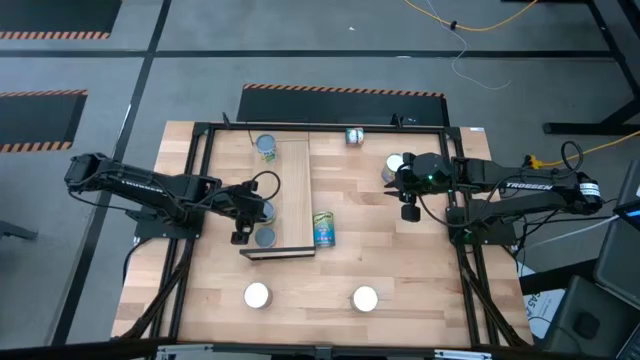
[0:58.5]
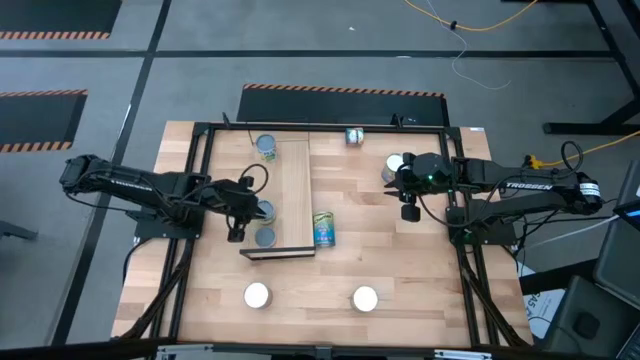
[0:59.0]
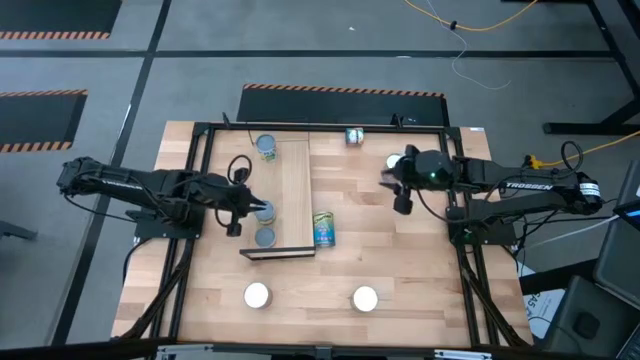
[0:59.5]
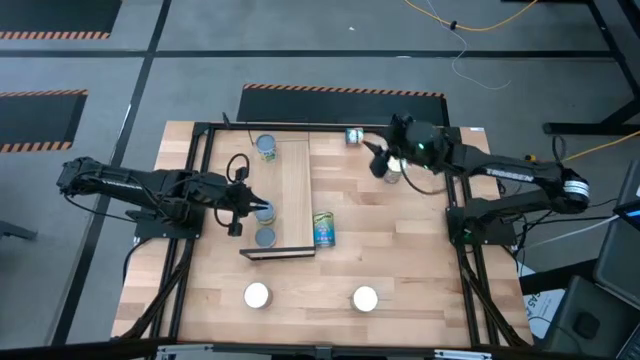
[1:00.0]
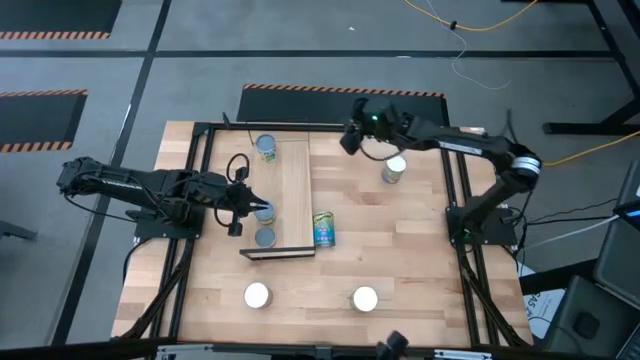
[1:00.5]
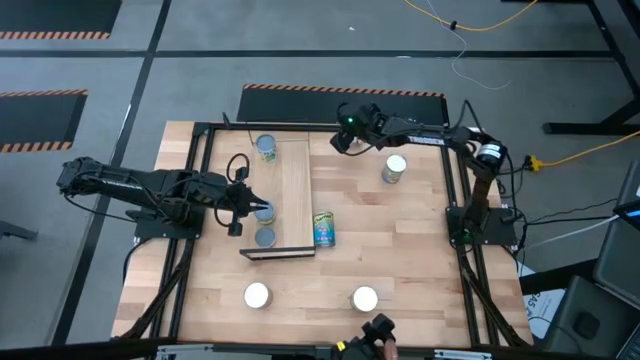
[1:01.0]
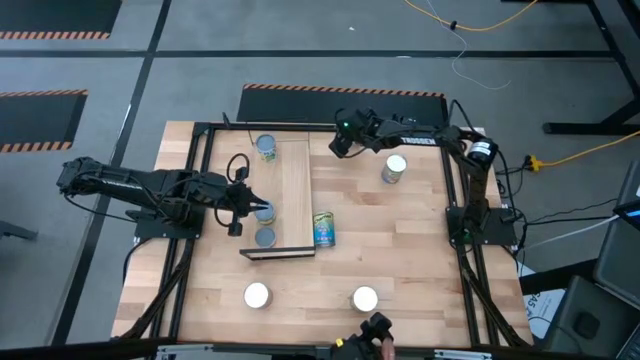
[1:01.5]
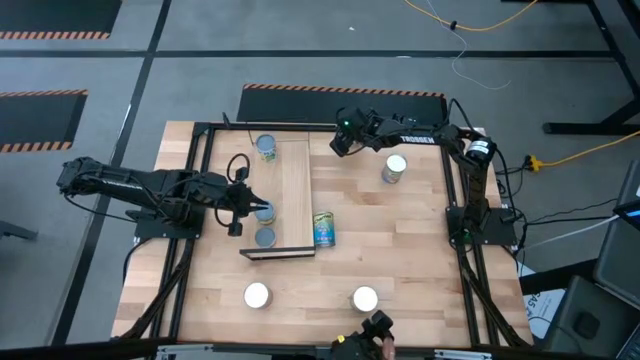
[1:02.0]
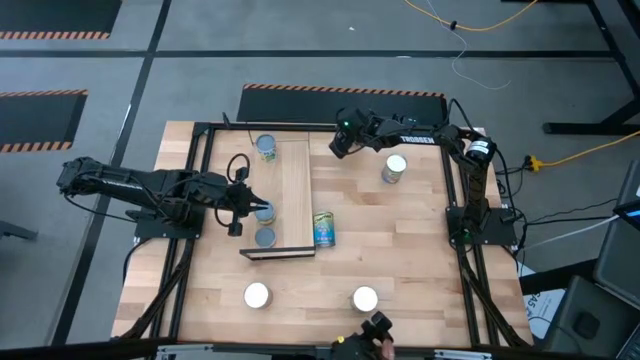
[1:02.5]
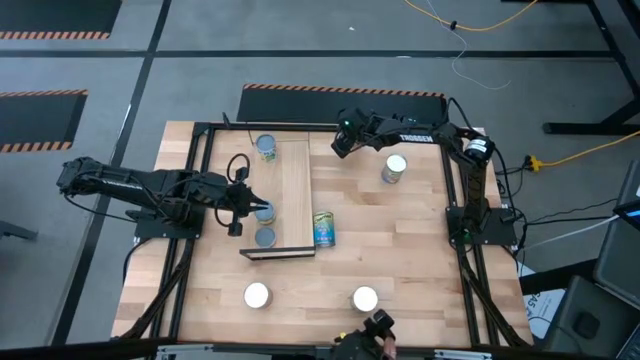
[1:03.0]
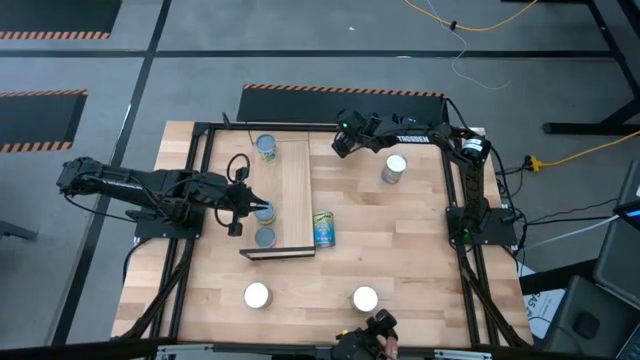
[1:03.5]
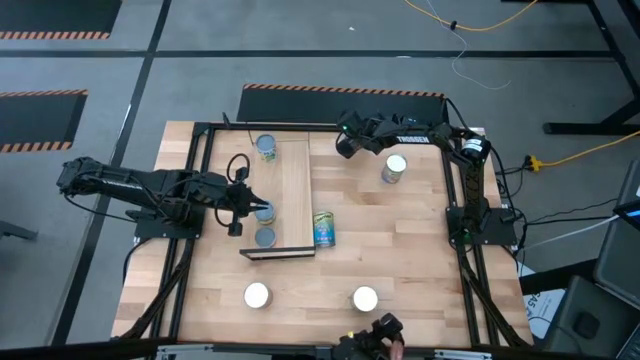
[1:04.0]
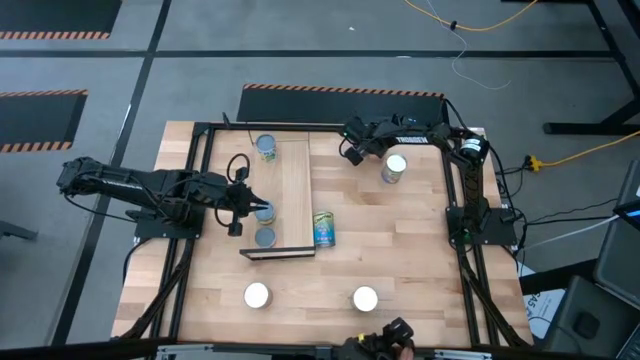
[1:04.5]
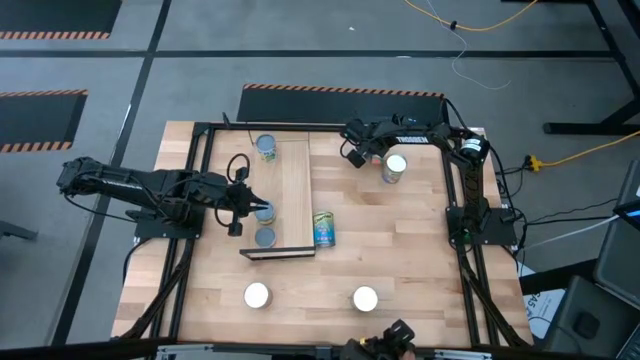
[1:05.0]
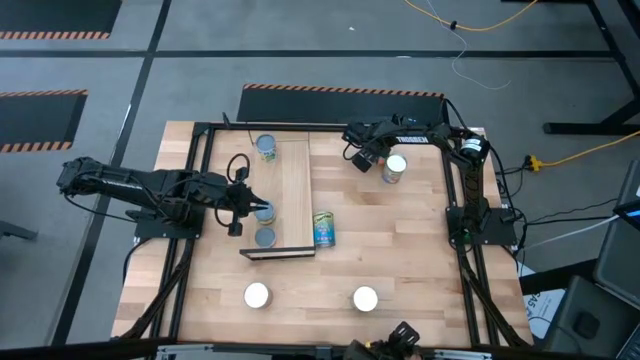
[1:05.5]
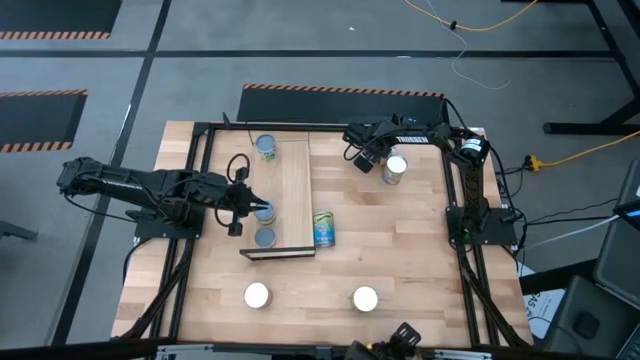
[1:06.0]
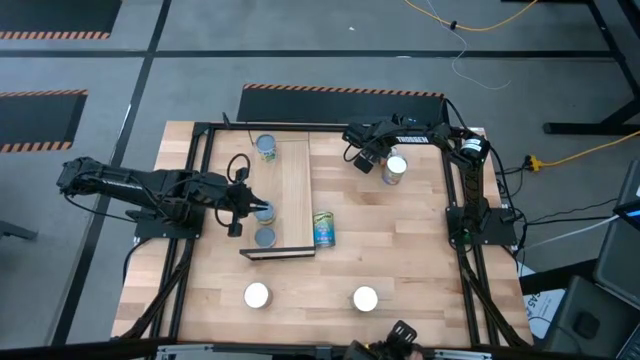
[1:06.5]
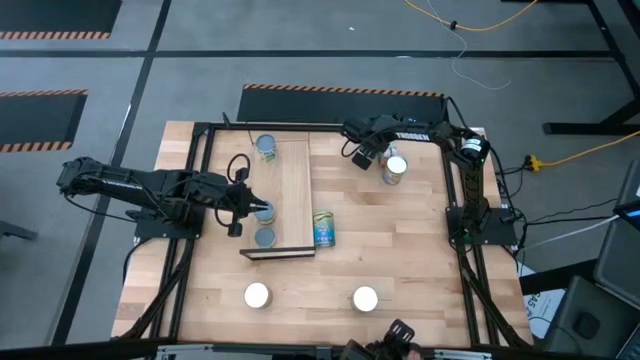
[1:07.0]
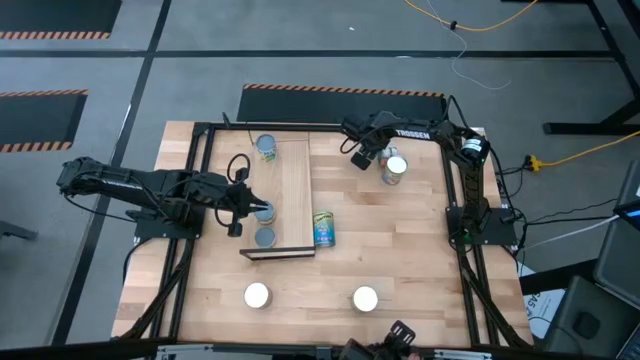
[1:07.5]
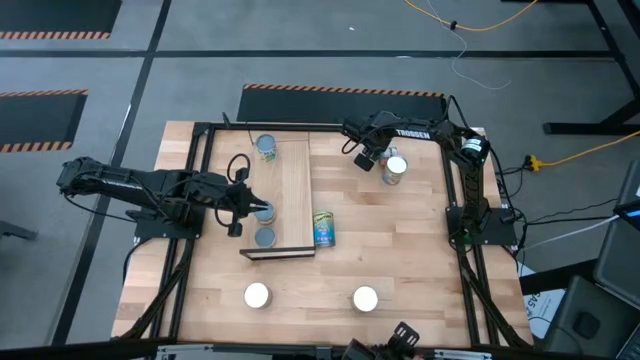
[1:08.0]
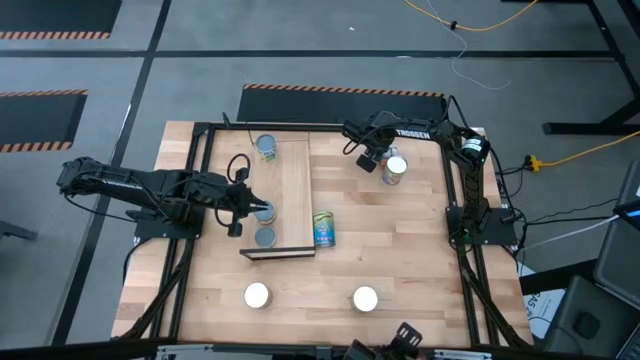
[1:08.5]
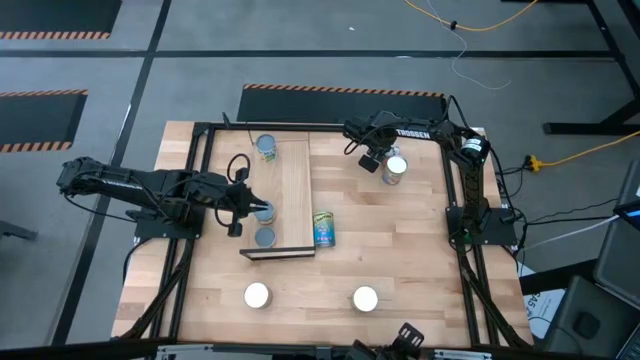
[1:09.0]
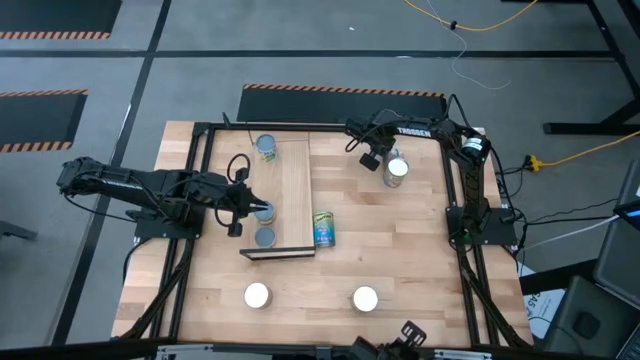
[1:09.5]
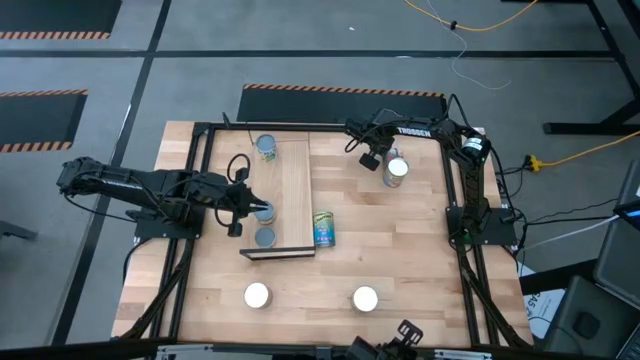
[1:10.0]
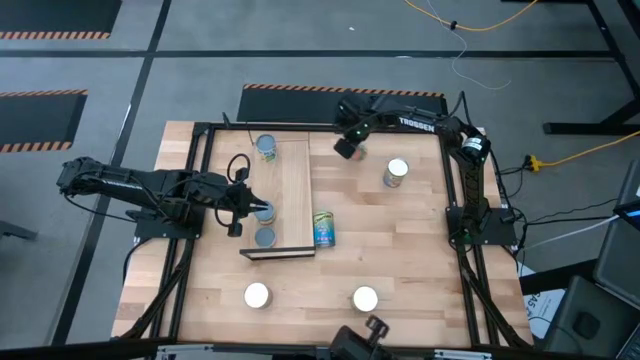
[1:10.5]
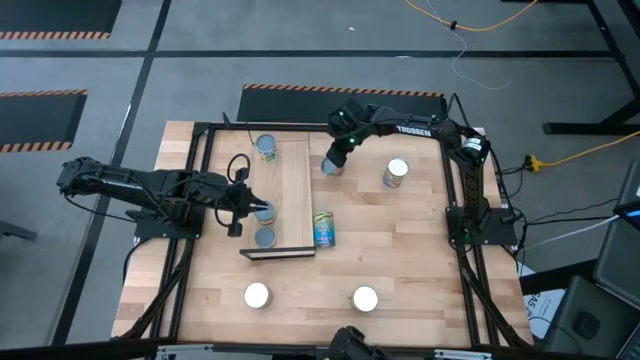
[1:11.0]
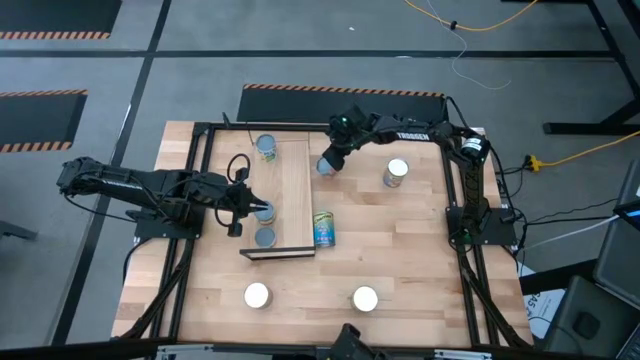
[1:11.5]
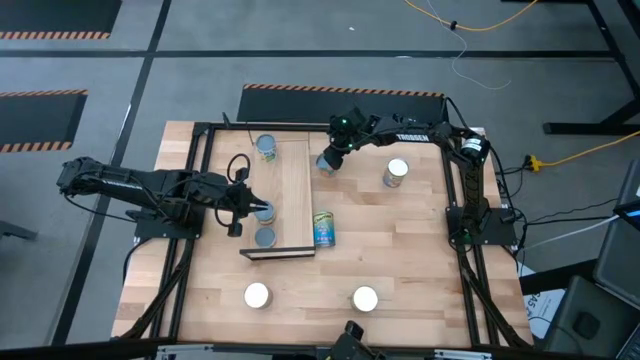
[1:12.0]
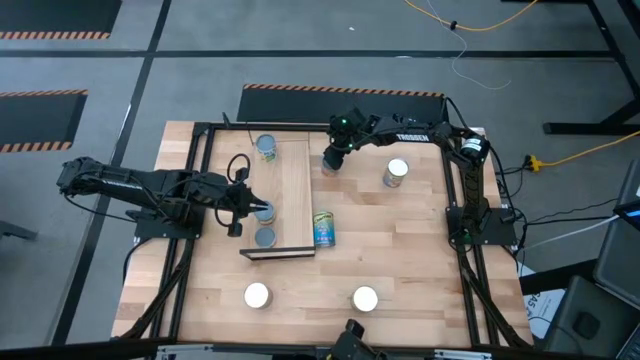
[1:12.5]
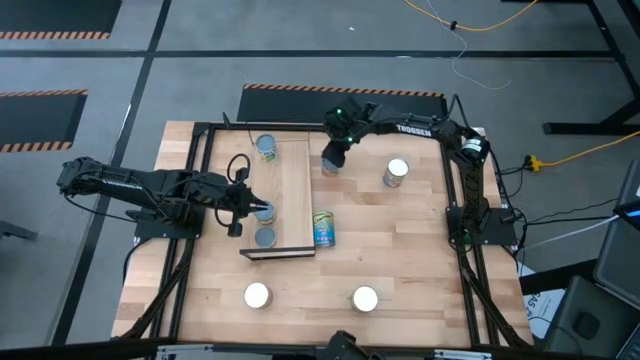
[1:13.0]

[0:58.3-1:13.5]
Task: Pick and place cans onto a shelf
Put the small canned oranges on the shelf

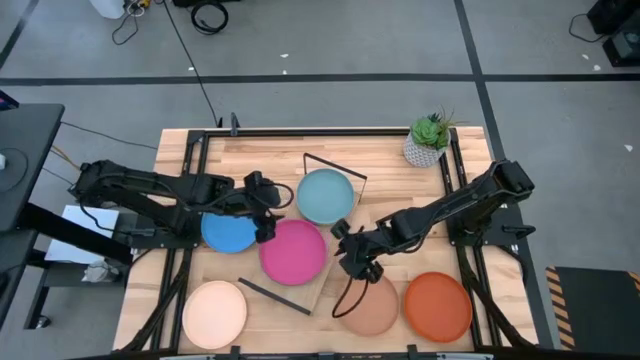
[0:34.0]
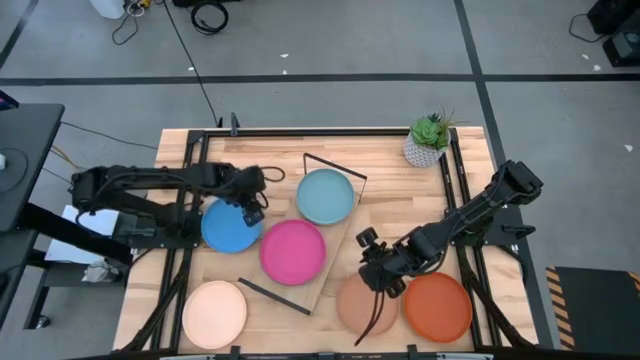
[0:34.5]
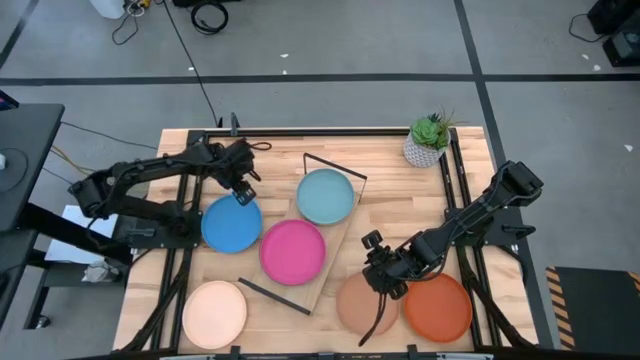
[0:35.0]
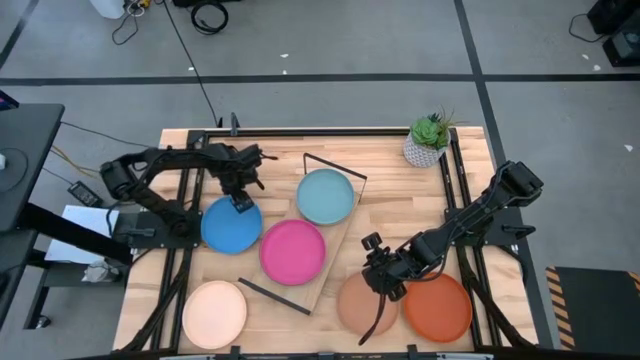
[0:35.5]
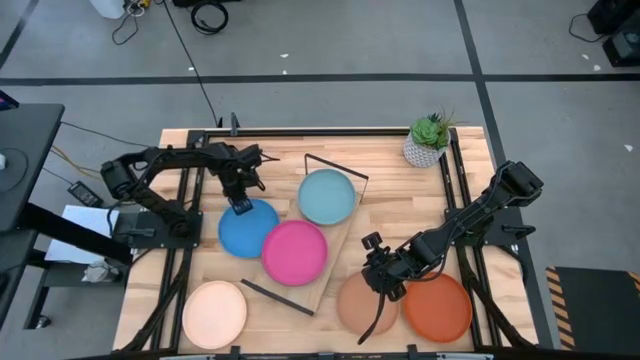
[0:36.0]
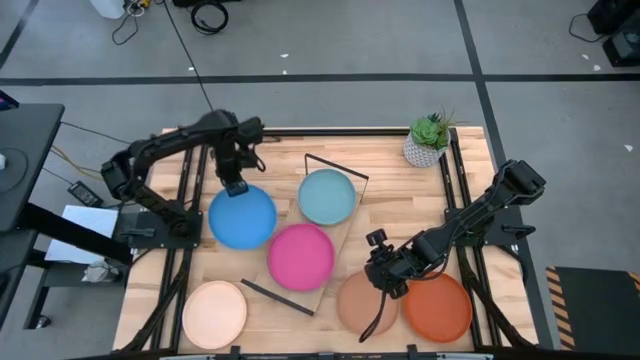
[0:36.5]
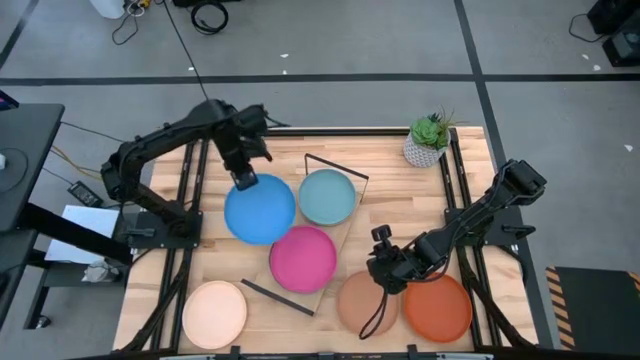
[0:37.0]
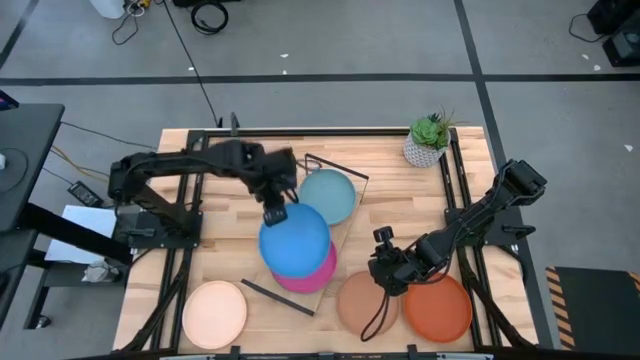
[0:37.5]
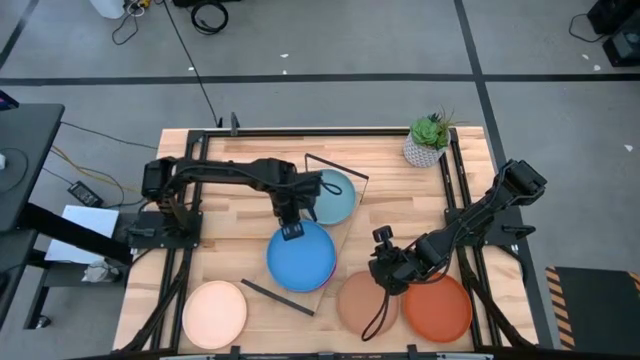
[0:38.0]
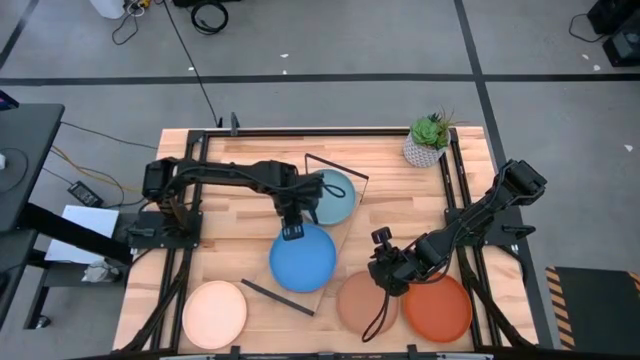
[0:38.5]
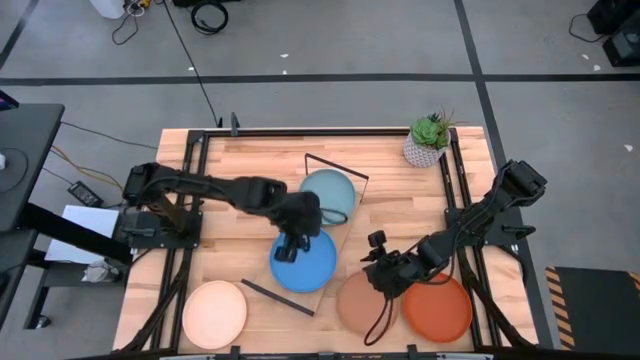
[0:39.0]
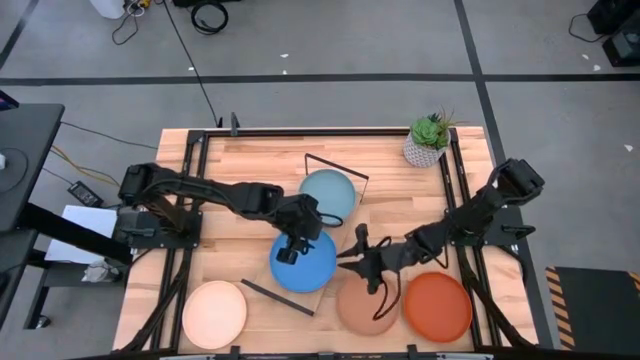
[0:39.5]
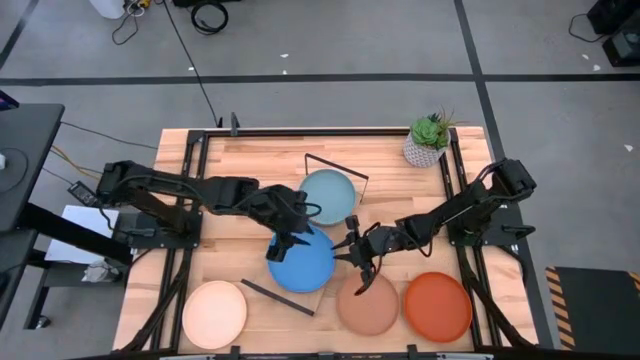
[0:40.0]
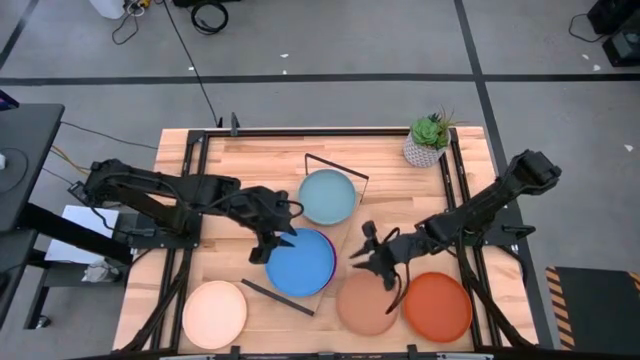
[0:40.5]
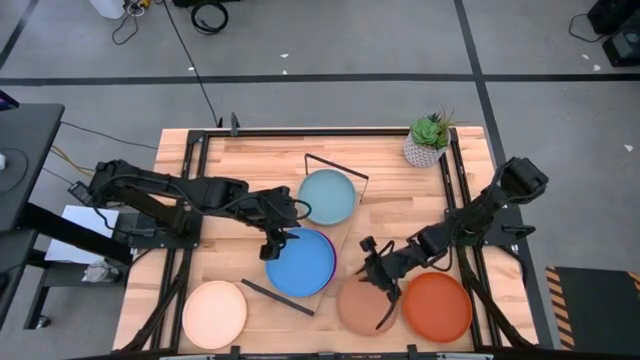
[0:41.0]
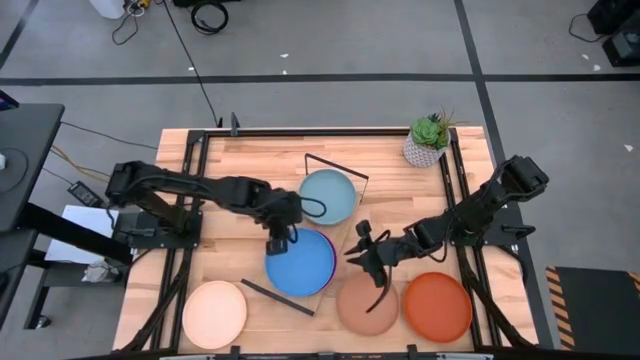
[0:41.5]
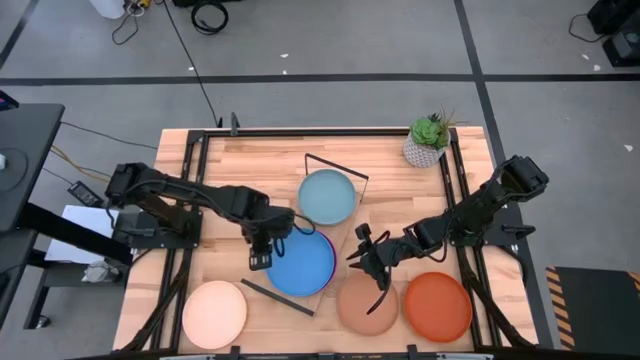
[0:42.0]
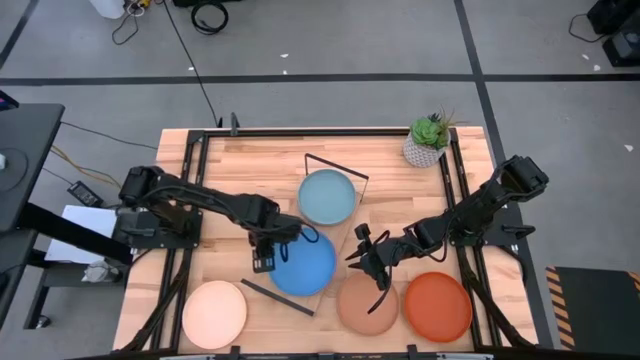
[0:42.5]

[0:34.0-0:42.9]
Task: Place and stack plates onto a shelf
Stack the blue plate on top of the pink plate
